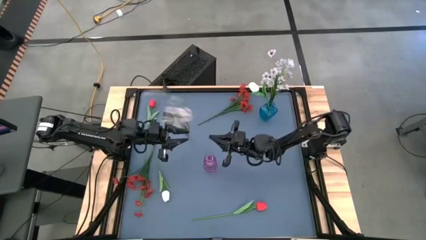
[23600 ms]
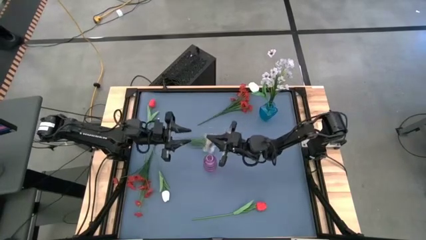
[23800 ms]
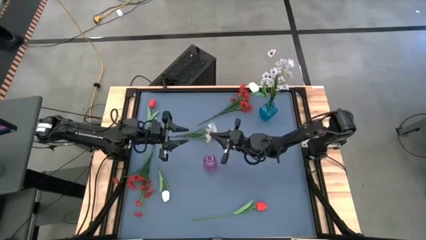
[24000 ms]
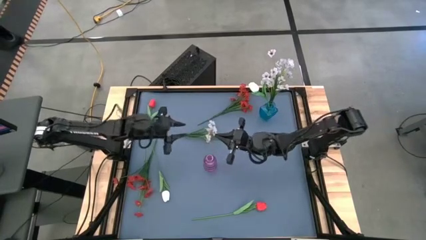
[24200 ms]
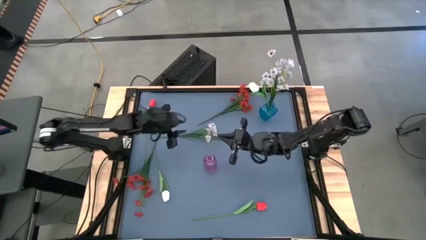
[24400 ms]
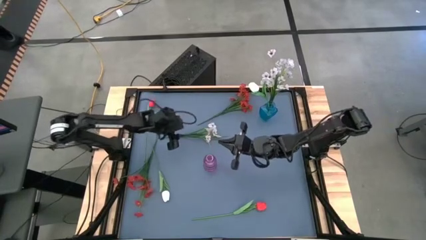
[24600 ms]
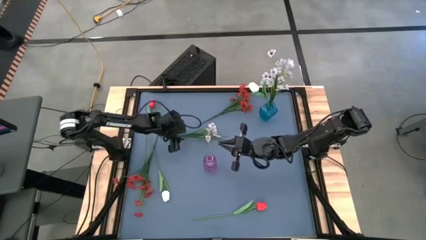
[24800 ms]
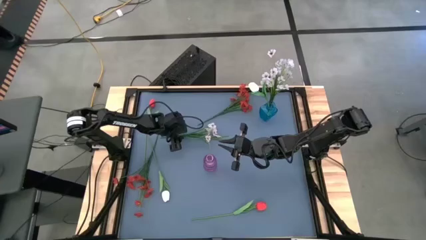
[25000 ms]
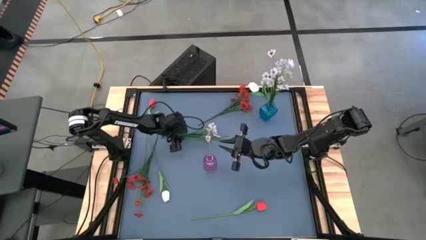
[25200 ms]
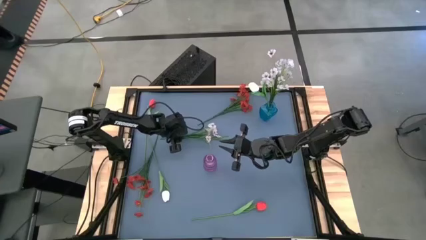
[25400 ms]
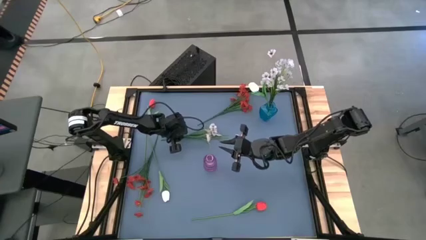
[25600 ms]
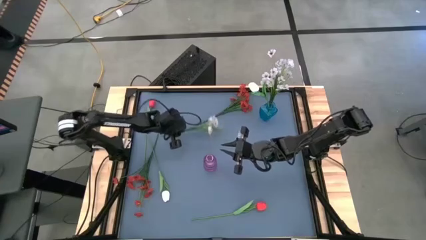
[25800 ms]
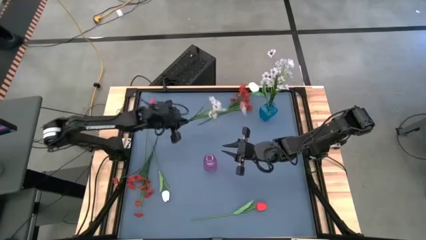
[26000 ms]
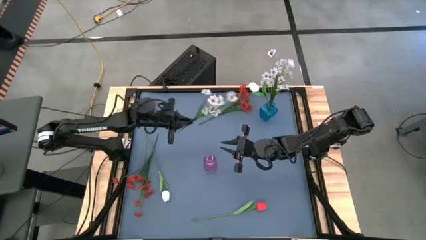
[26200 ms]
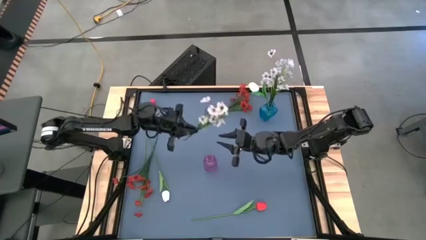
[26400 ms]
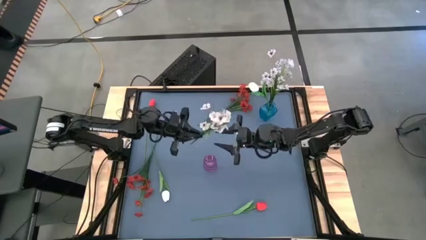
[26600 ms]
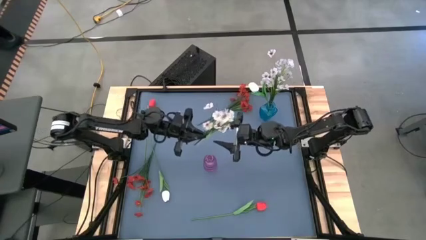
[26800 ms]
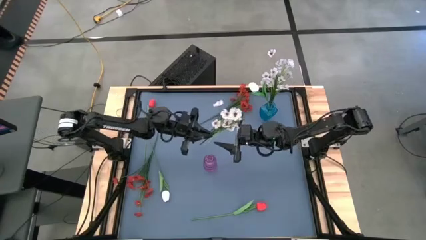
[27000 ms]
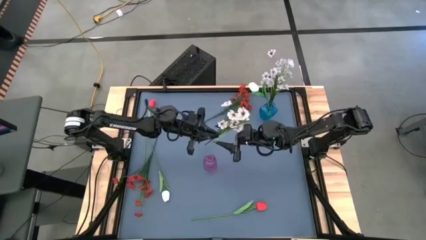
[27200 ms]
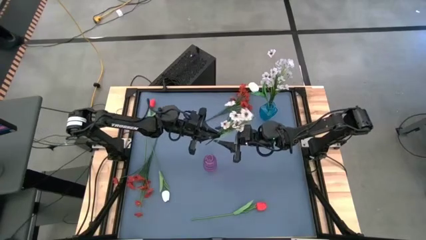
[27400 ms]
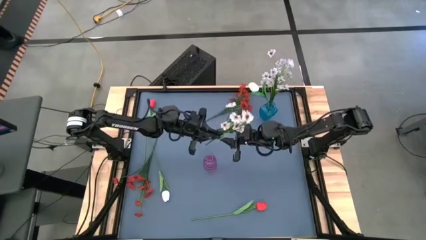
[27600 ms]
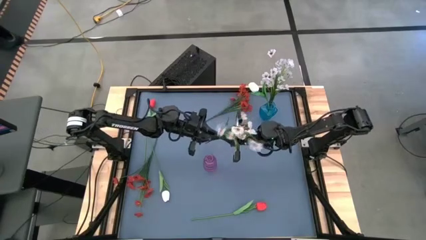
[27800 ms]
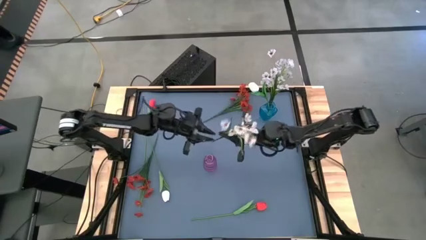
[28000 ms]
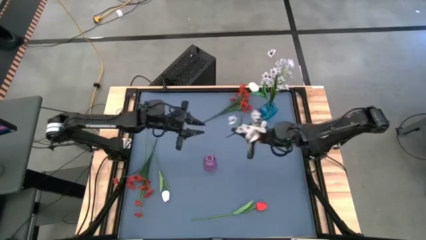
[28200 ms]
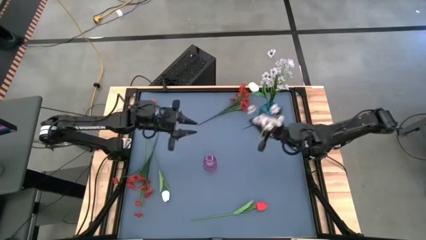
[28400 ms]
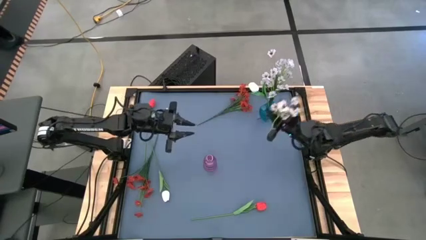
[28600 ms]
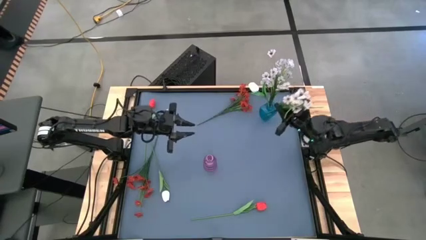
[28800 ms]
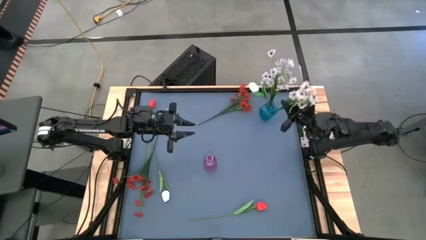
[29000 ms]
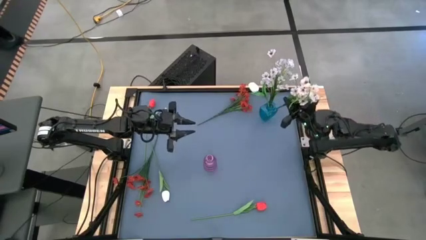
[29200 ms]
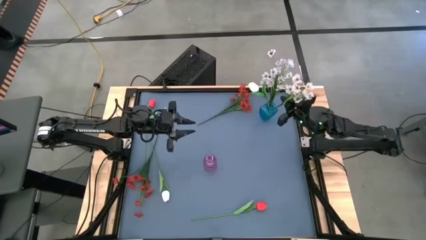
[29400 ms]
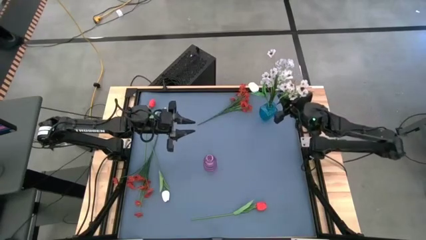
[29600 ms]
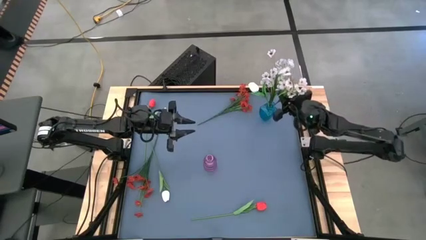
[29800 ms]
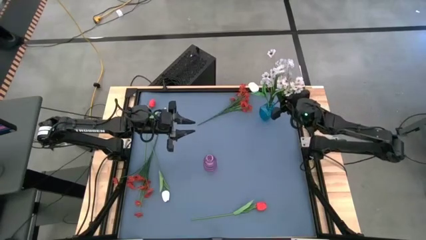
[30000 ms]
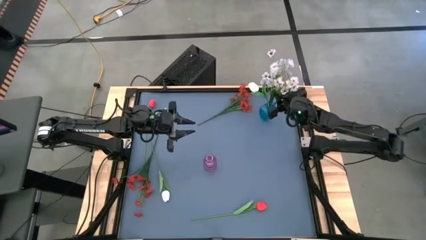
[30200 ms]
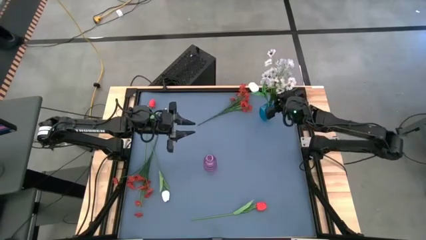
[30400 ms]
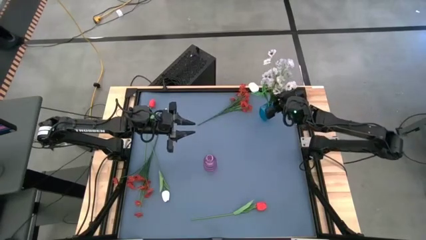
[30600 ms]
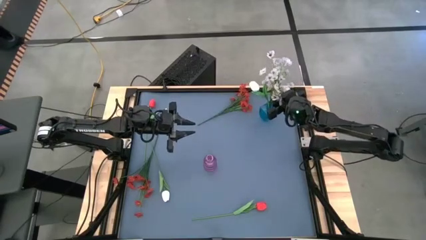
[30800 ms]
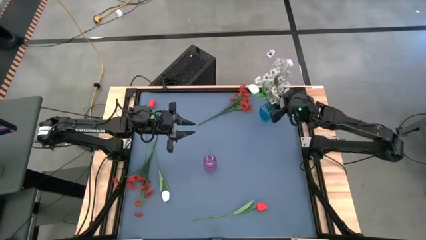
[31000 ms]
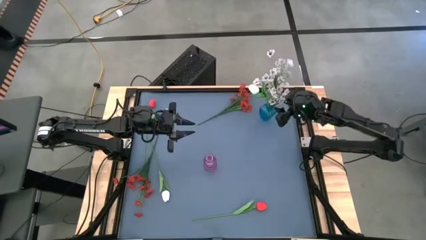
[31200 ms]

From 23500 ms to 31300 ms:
Task: Sort flowers into vase by color
Put the white flowers into the blue vase

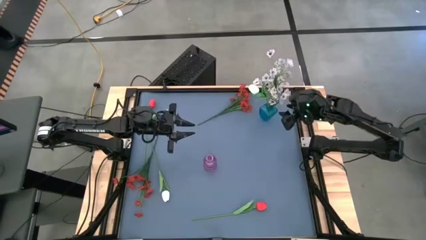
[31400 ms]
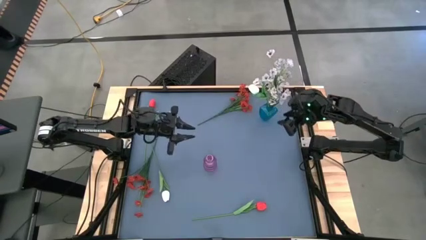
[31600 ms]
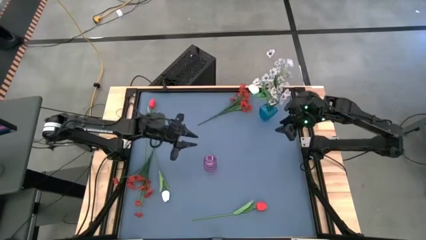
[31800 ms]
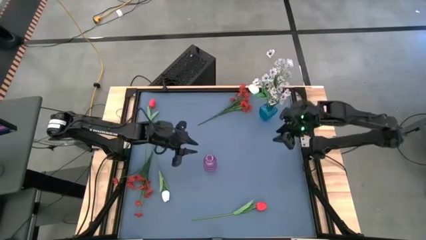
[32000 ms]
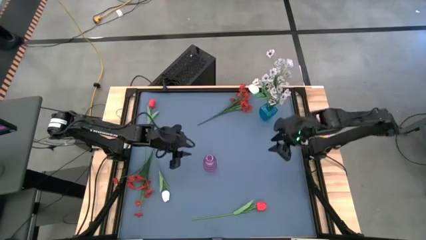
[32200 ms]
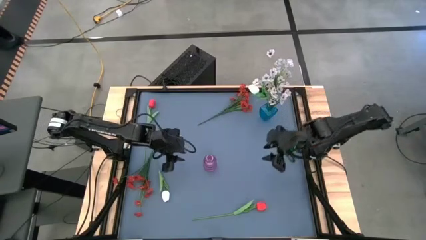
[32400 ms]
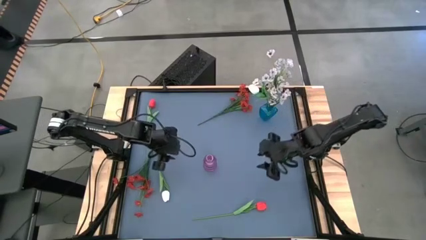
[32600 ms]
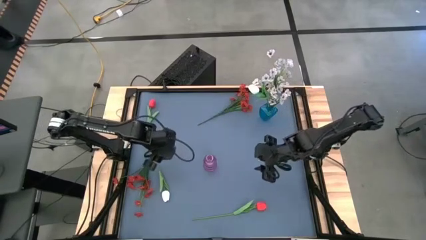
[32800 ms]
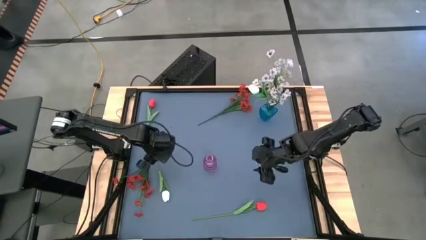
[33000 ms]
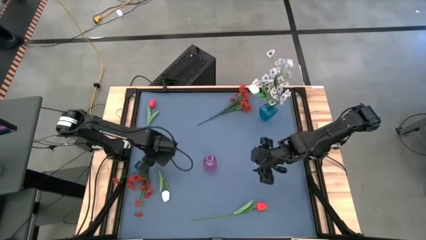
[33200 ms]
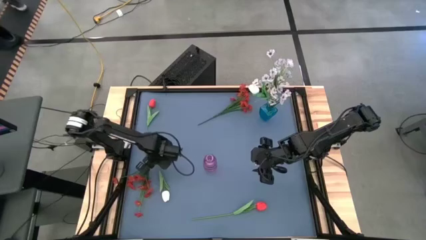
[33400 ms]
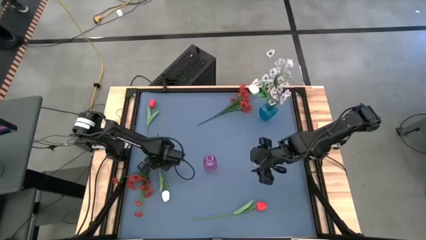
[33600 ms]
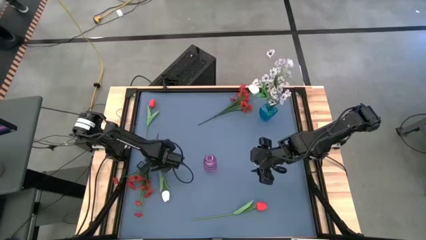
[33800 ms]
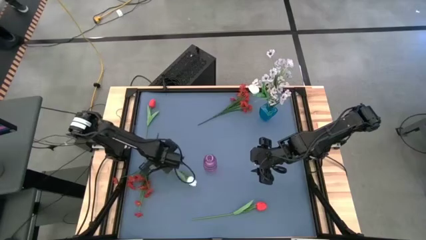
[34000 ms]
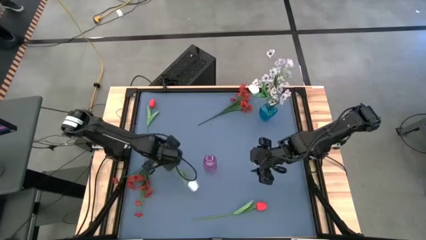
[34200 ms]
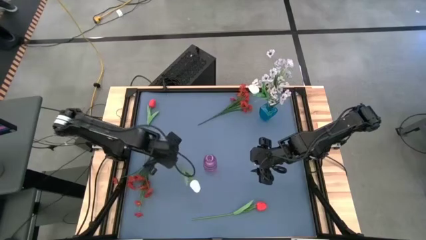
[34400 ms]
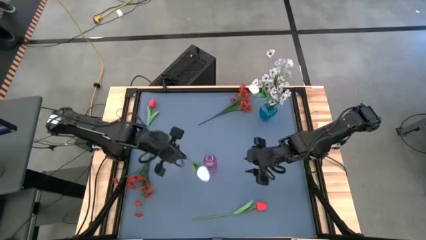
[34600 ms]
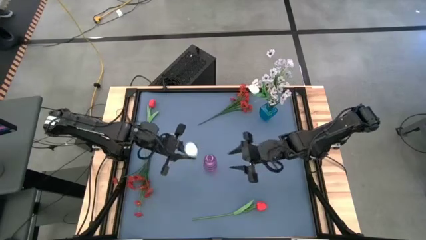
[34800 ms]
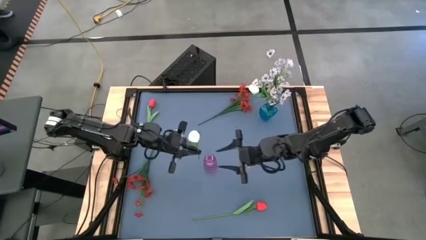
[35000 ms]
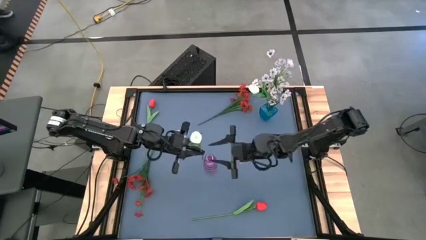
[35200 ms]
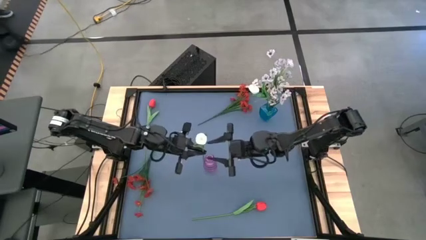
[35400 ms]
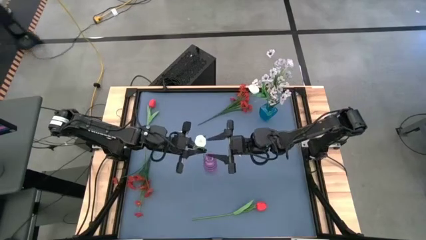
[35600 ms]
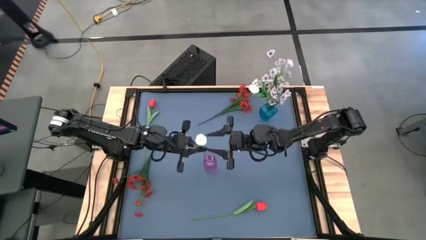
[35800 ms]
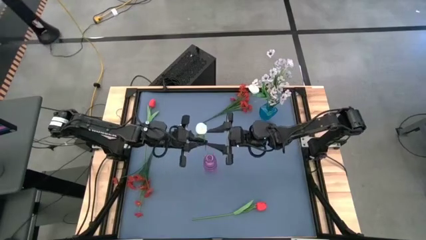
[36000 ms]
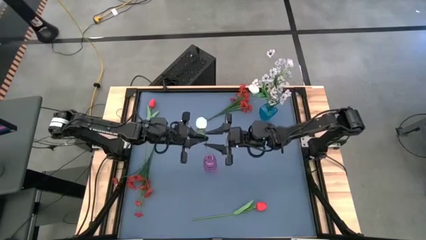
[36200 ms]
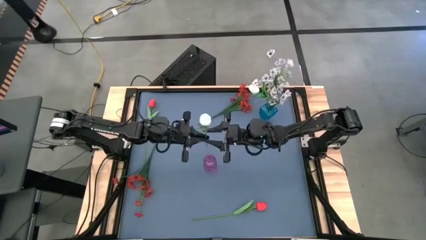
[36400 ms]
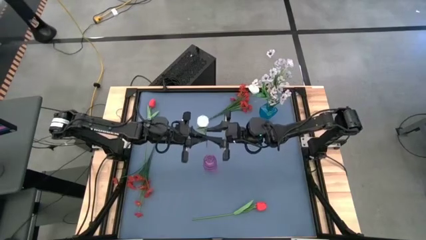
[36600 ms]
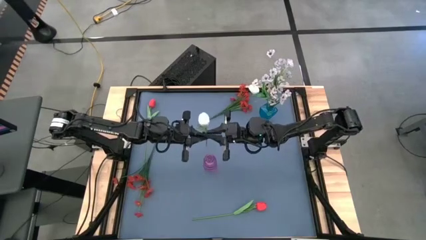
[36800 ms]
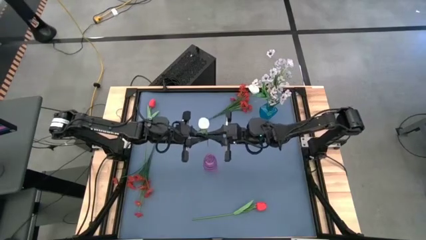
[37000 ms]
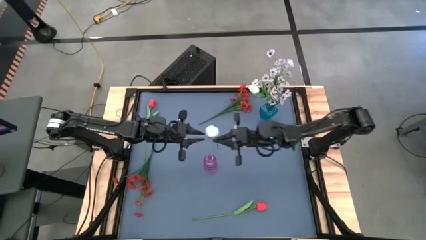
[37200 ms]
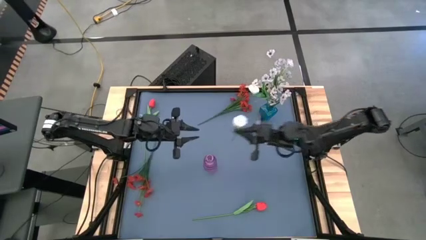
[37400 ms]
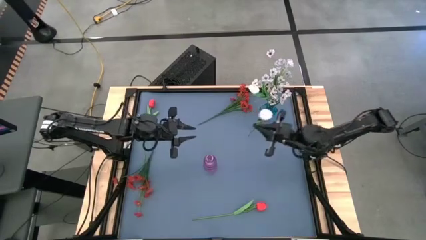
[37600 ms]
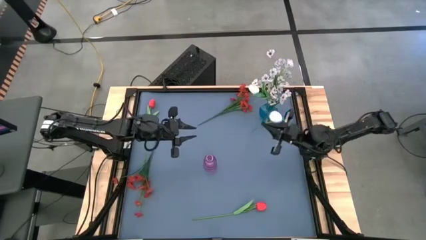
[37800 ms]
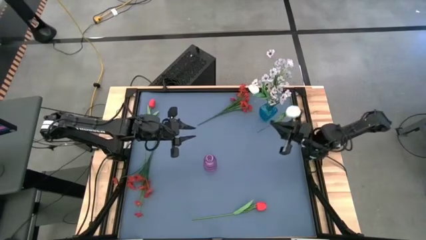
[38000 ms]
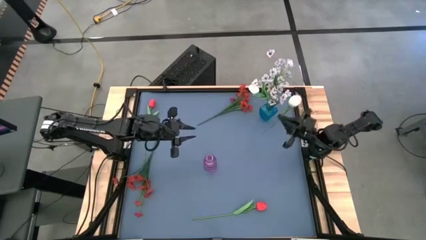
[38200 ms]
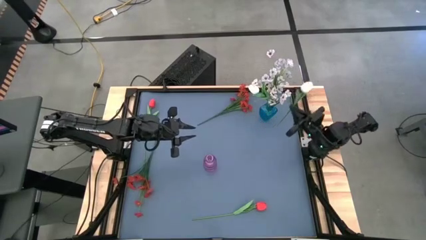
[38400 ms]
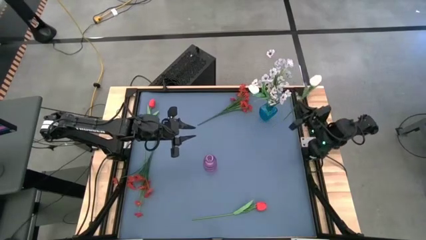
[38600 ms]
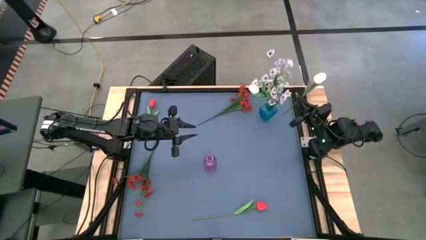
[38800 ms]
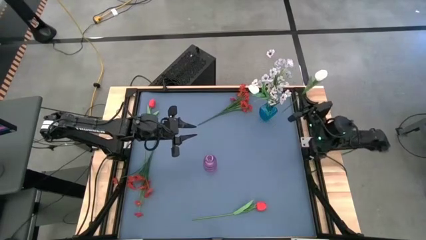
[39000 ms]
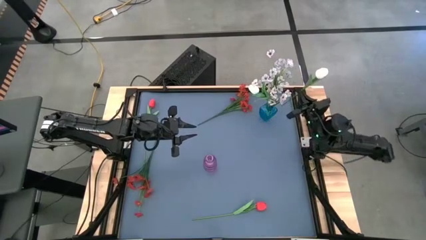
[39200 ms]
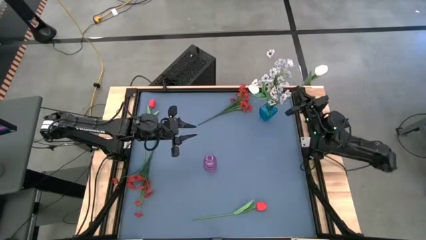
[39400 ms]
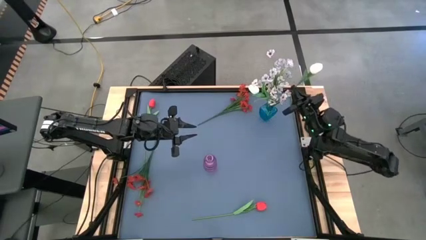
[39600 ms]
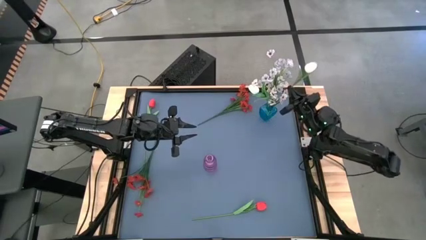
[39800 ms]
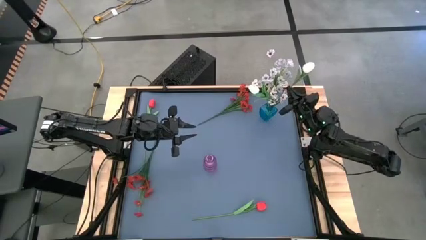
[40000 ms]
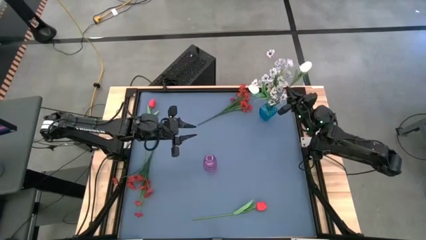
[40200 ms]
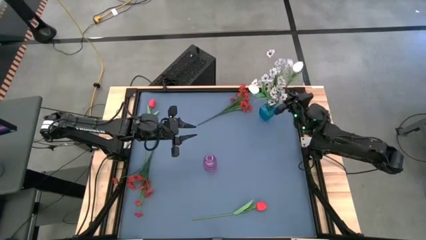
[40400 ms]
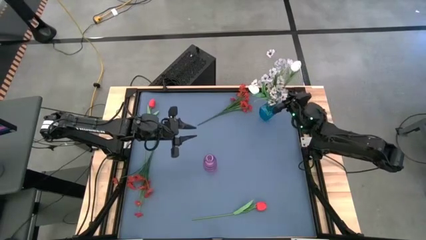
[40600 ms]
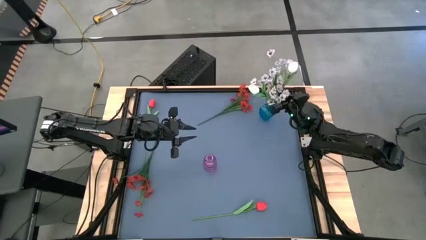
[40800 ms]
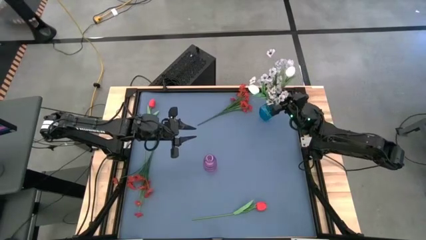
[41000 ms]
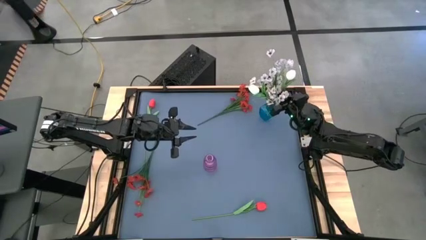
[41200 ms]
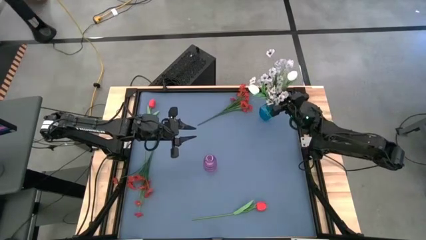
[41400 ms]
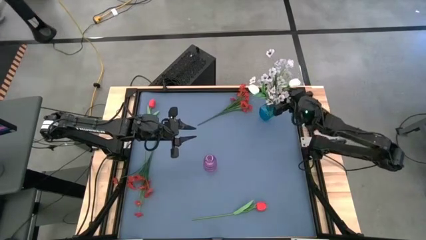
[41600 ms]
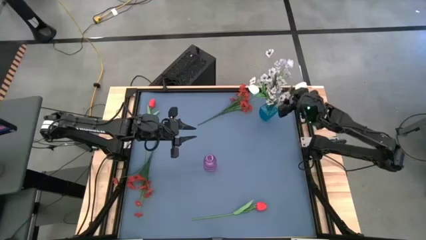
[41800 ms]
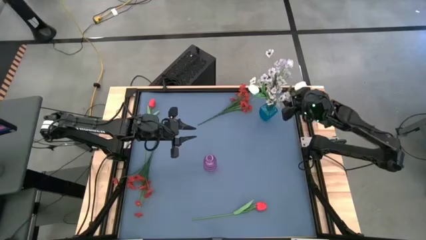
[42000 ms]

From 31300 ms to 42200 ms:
Put the white flower into the blue vase
